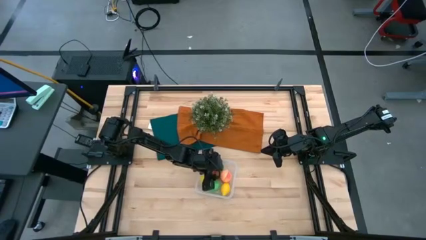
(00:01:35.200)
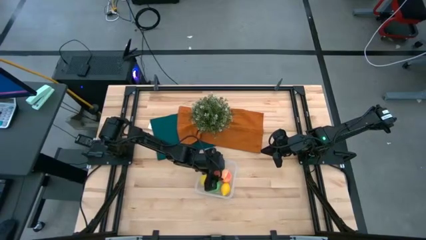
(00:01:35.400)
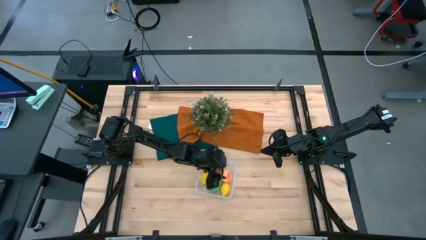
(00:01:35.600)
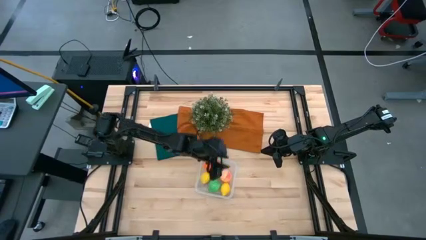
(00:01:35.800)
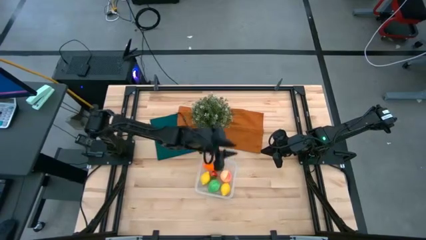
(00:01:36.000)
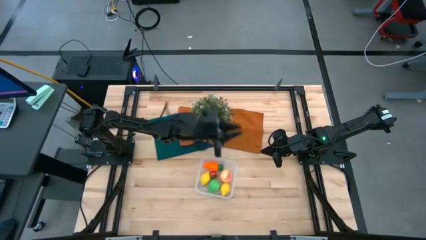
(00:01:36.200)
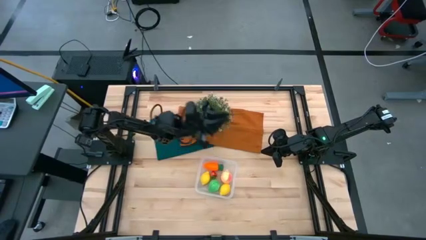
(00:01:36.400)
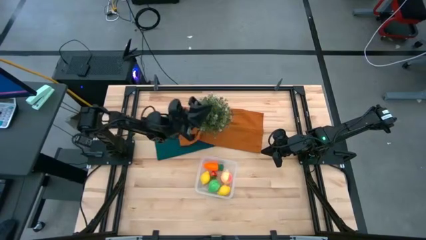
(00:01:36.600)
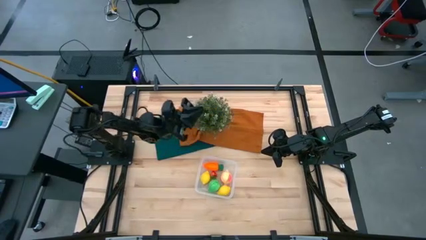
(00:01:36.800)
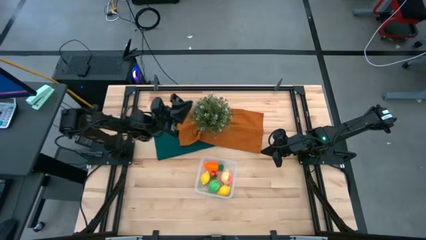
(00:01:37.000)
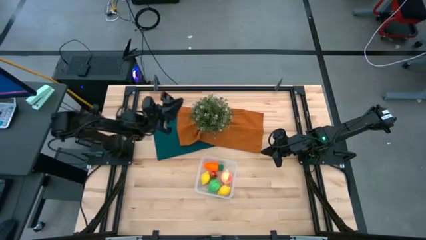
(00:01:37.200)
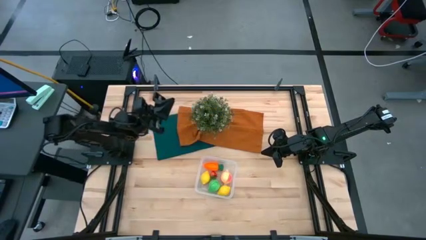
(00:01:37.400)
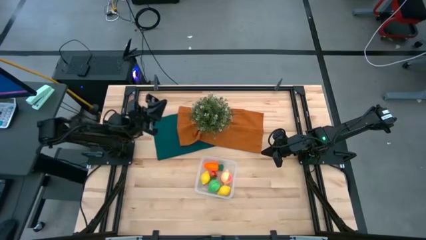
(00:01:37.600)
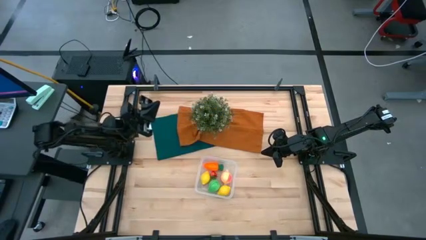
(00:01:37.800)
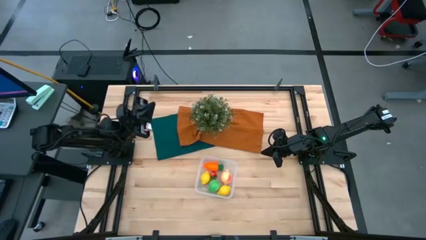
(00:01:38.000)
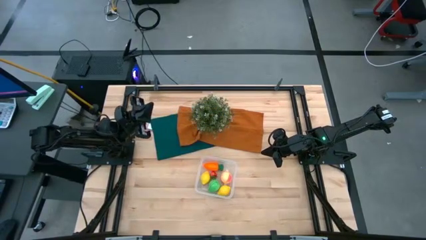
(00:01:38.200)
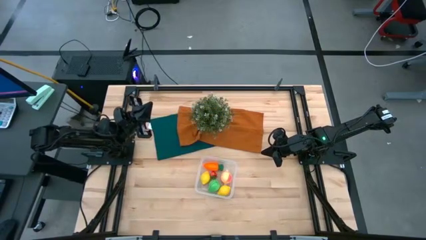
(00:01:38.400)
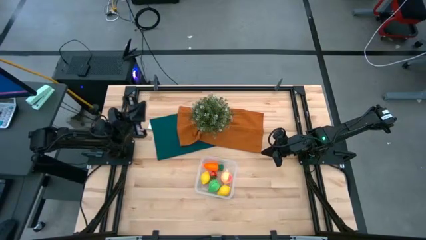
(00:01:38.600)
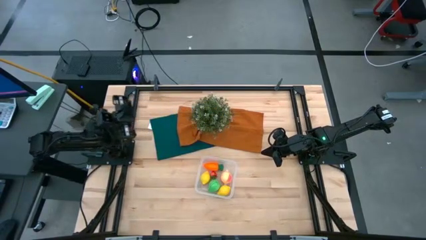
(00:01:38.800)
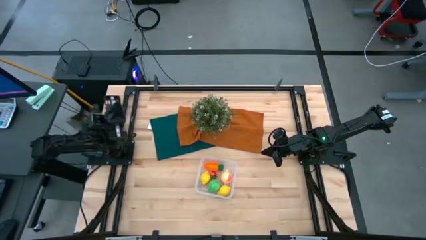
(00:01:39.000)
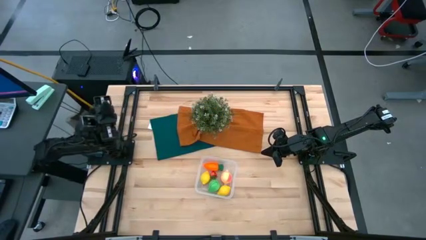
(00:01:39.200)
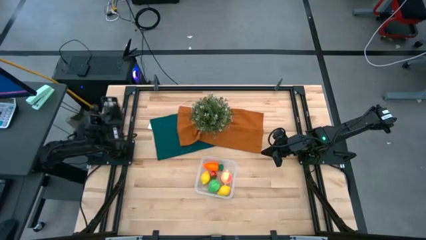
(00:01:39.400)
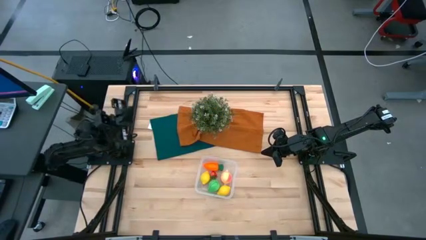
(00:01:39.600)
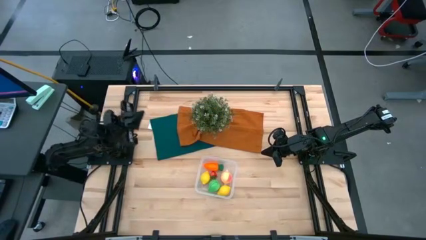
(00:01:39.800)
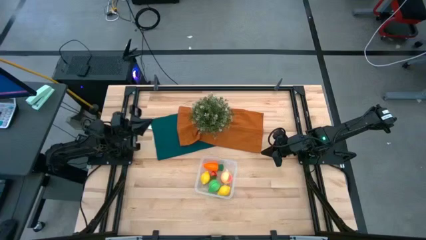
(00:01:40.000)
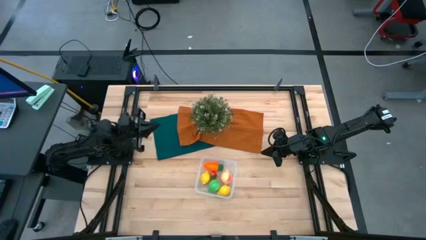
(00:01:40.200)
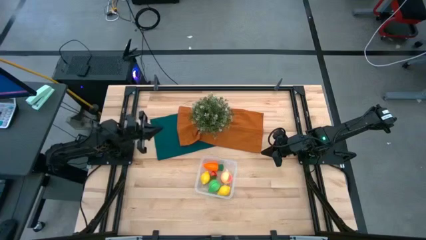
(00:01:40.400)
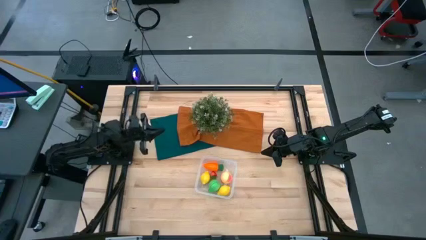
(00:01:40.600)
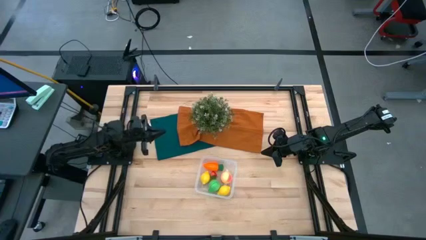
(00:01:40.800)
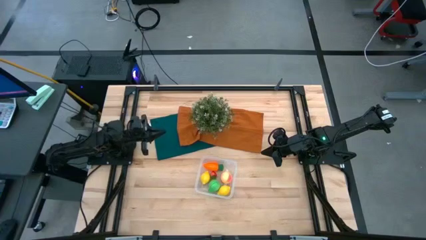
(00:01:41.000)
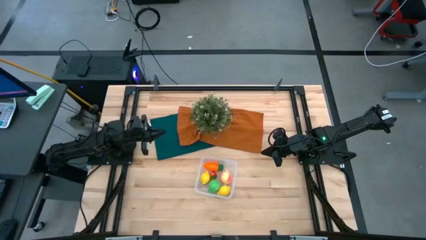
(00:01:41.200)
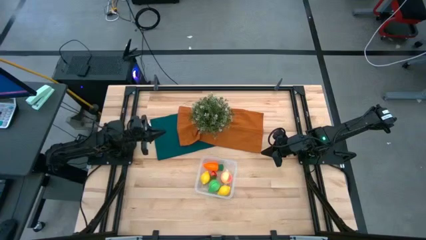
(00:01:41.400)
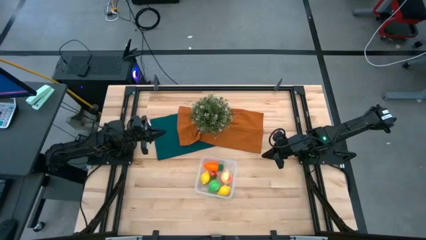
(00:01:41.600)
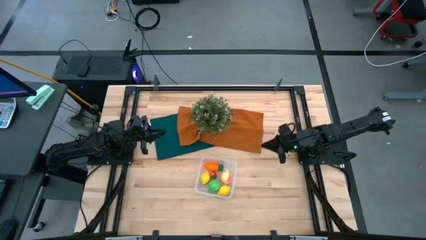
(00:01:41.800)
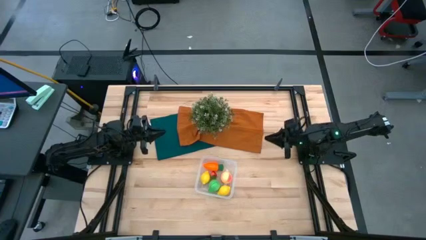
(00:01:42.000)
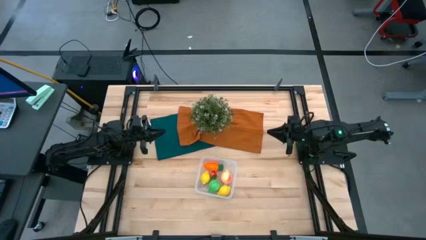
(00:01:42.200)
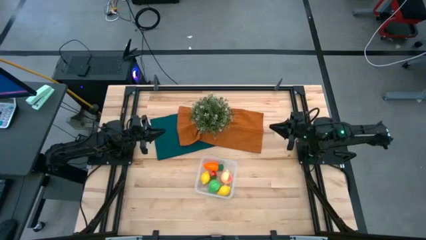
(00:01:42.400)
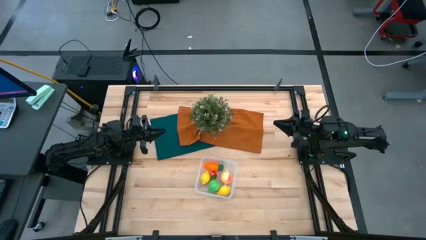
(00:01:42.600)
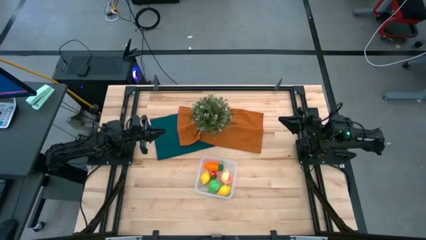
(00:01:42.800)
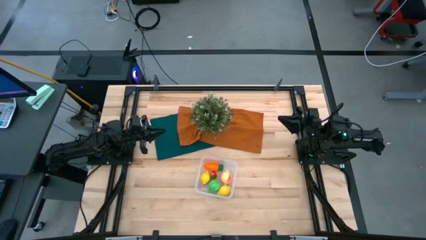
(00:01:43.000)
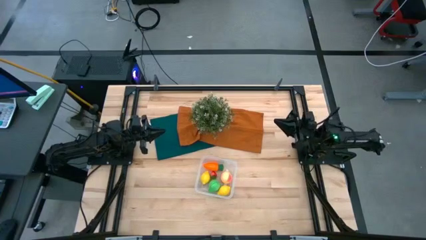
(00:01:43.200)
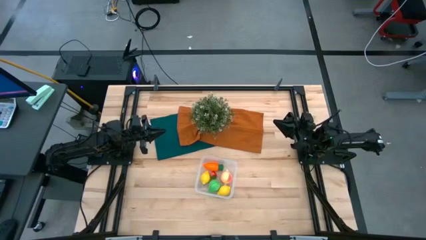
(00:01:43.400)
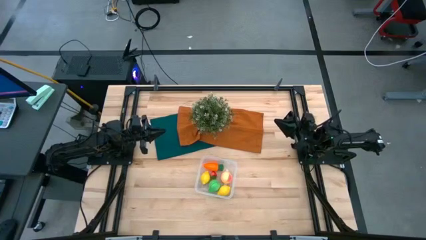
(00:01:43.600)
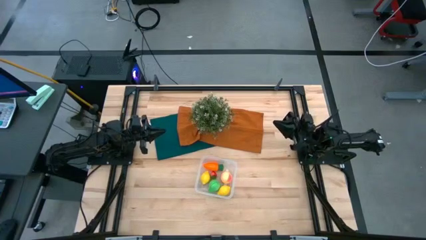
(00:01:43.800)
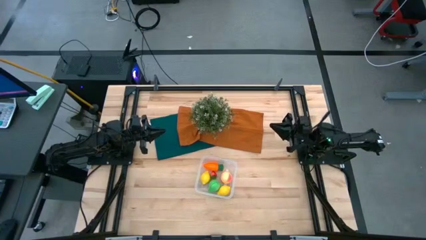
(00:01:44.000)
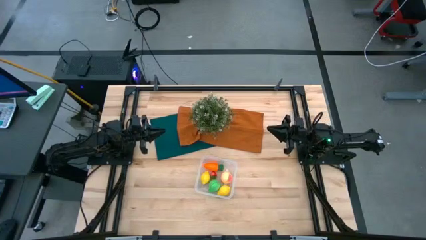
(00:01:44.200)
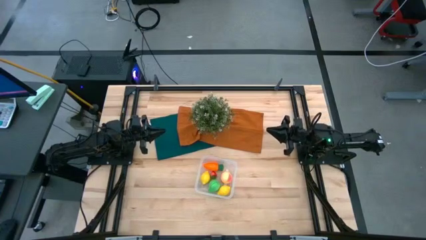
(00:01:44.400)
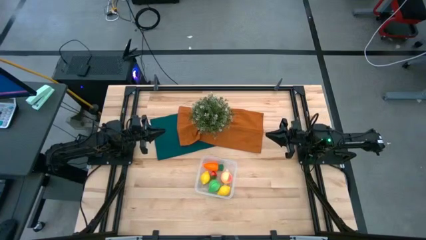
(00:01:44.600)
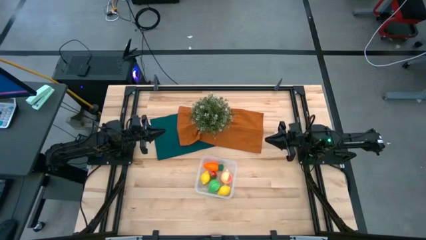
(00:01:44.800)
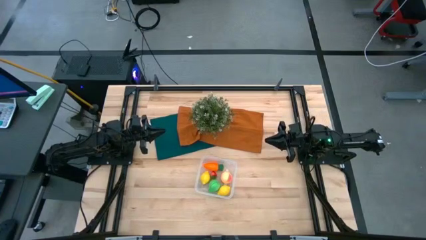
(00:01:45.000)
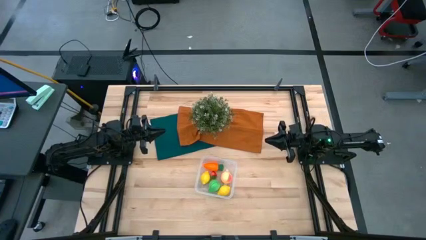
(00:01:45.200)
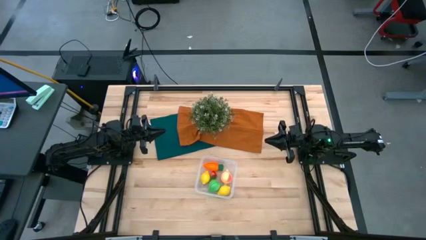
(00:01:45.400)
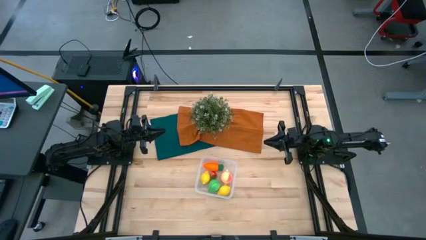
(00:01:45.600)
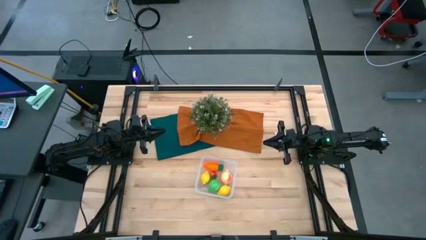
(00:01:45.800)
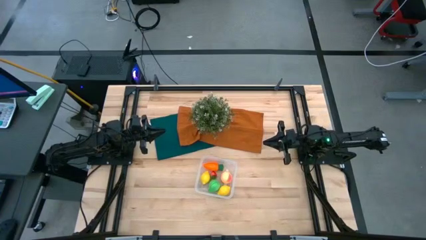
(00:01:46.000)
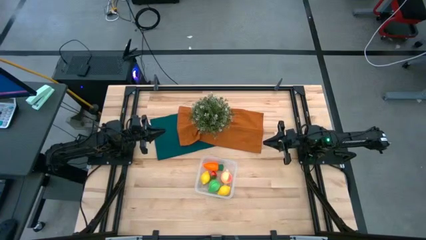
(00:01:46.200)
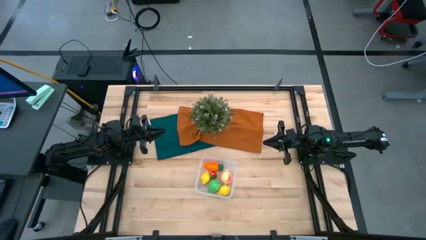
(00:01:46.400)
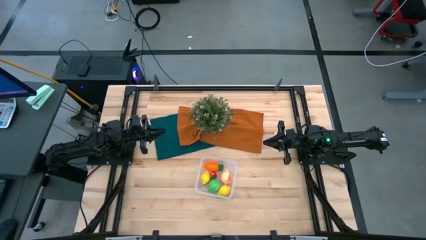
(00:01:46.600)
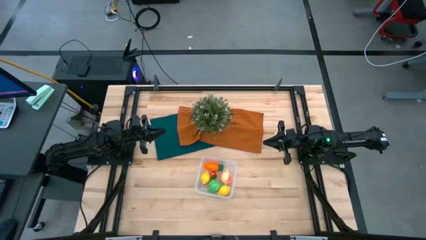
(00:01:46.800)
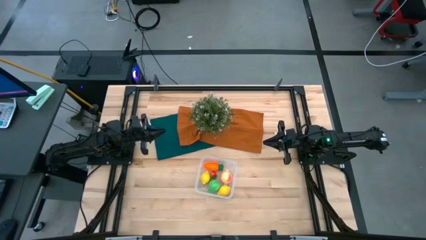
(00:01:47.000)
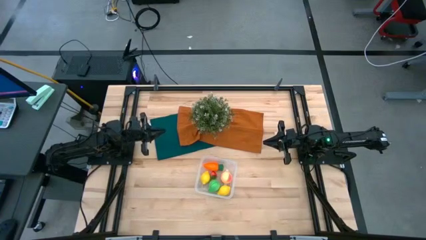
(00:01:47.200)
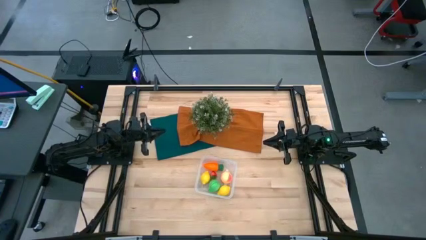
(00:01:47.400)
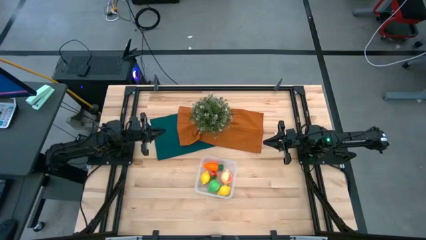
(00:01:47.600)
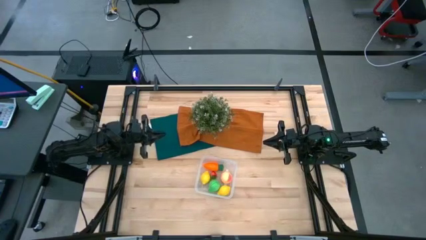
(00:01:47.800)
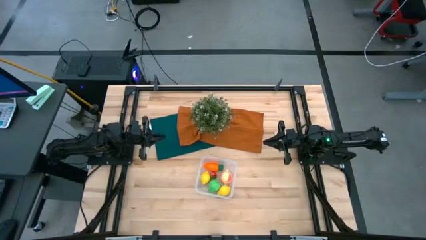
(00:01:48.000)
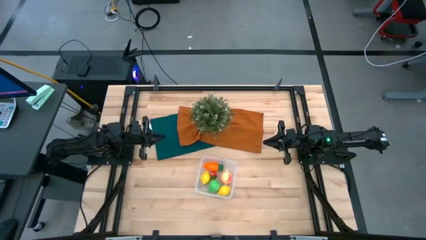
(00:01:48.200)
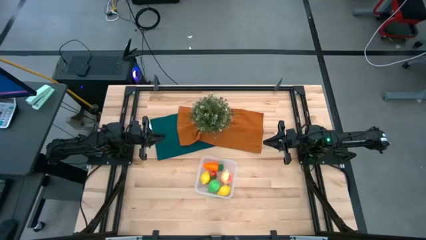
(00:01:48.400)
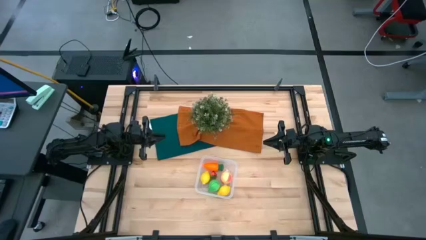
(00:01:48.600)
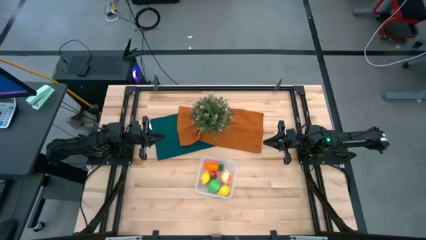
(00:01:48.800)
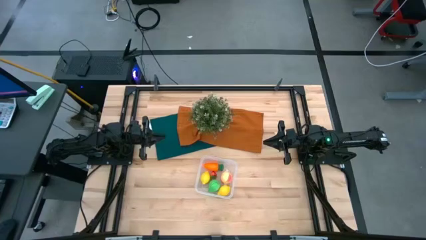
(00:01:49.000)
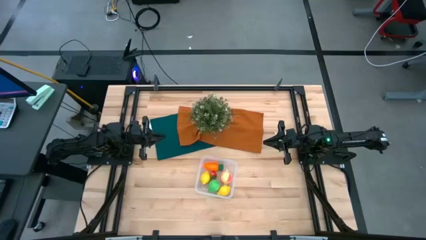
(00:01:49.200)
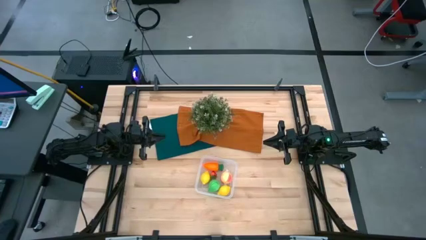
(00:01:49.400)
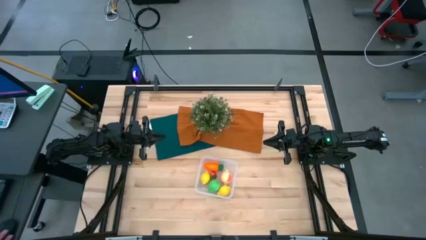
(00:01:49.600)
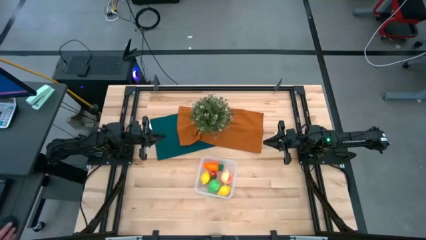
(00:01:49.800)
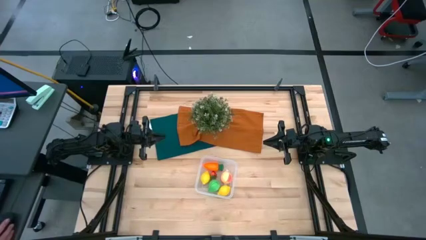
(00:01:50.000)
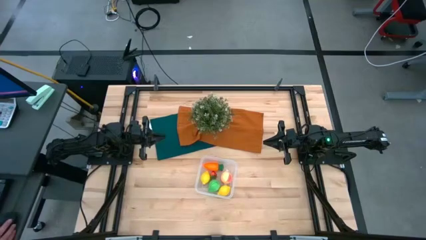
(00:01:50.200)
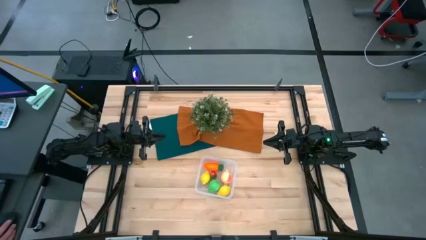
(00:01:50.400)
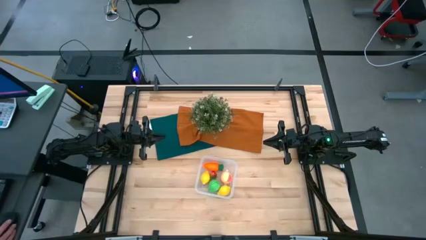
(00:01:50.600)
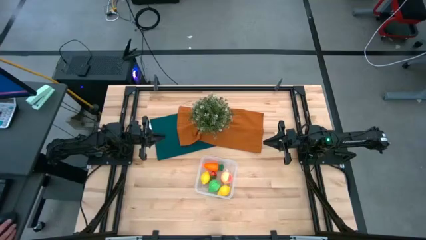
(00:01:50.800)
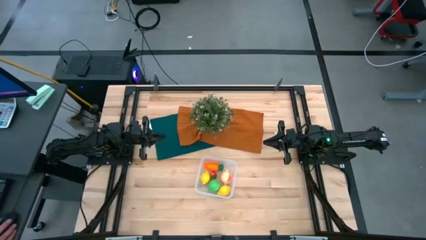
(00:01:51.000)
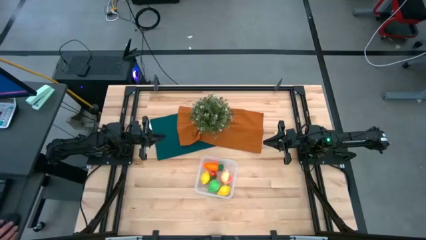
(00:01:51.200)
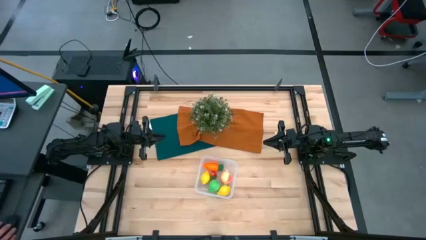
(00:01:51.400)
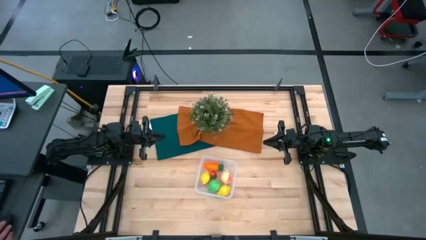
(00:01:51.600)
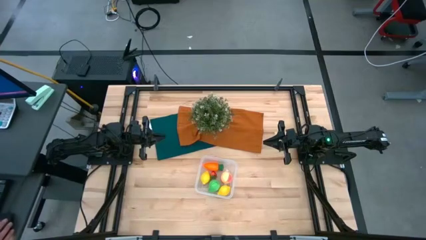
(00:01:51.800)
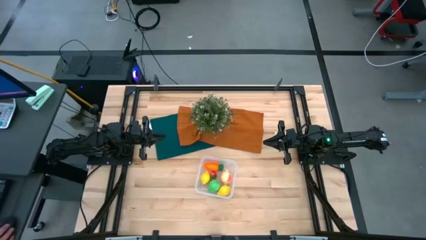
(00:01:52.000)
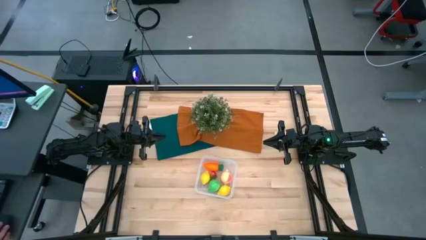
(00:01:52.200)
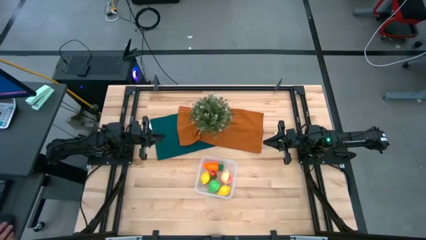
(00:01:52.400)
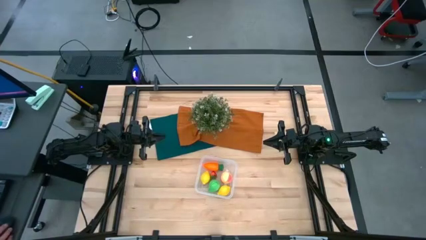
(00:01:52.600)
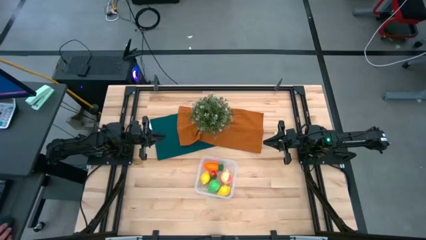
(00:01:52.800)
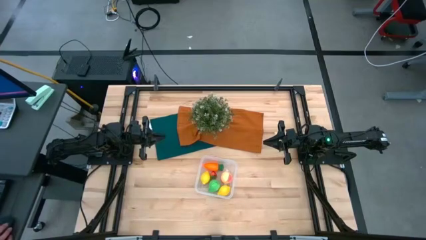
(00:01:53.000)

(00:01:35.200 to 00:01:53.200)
Task: Pick and placing Produce into tupperware
Return to Home Position
